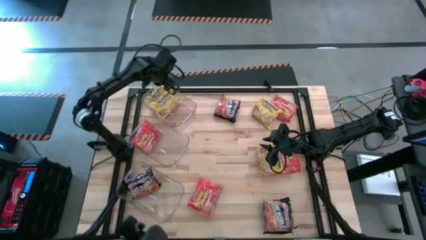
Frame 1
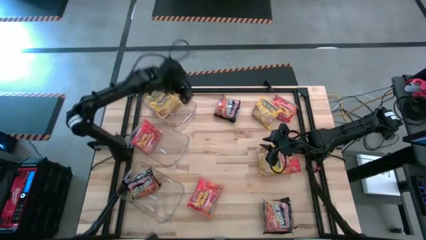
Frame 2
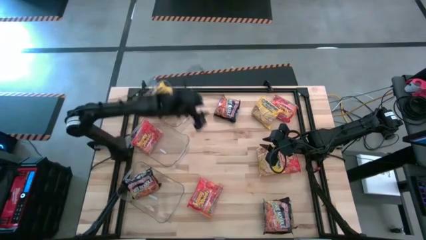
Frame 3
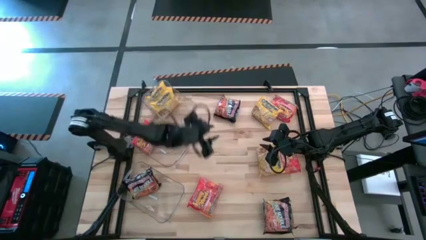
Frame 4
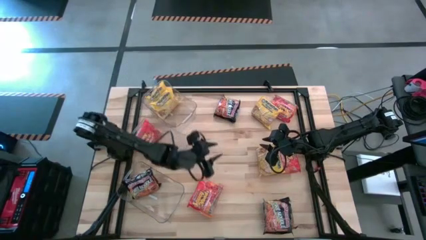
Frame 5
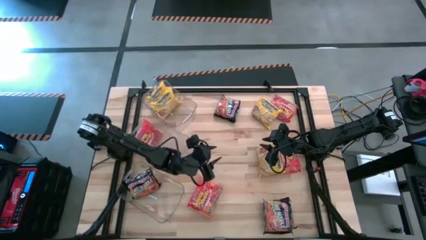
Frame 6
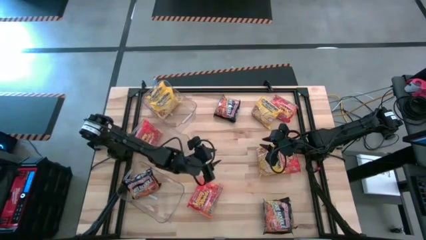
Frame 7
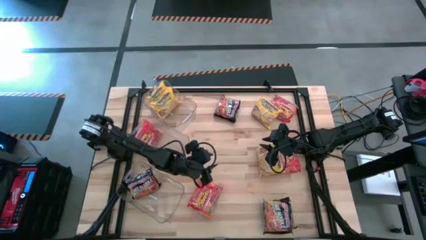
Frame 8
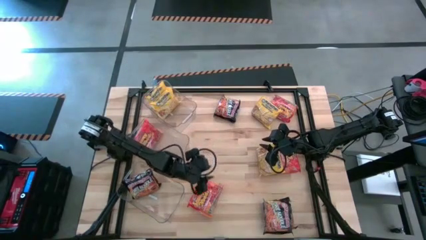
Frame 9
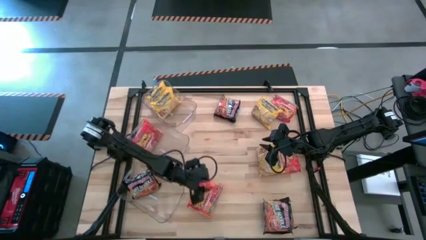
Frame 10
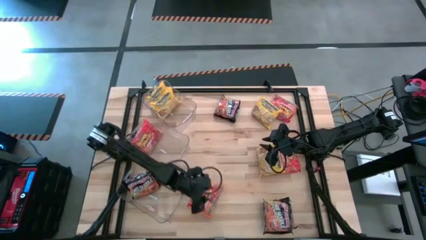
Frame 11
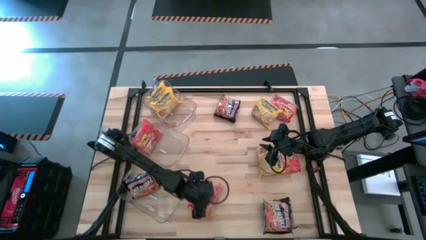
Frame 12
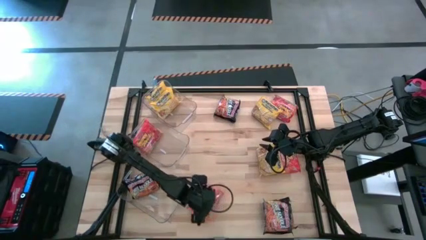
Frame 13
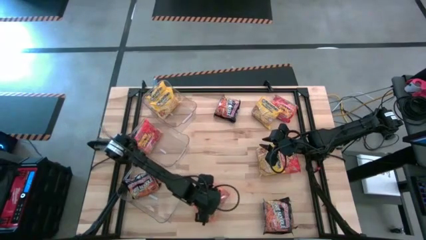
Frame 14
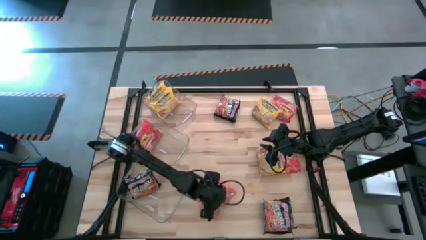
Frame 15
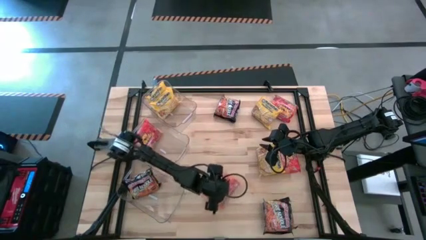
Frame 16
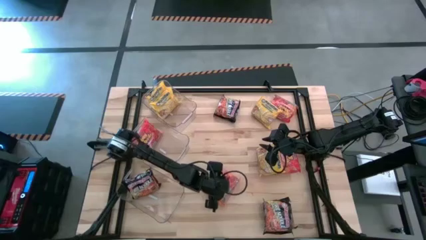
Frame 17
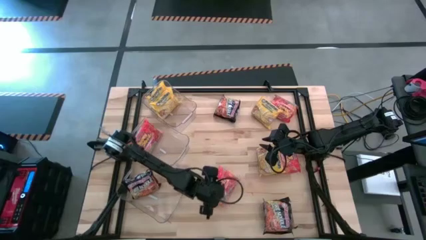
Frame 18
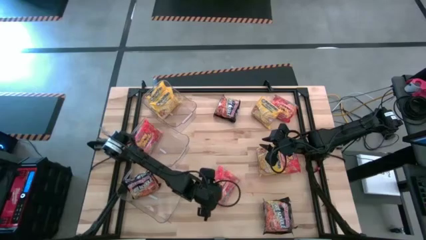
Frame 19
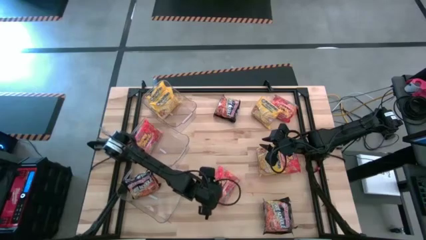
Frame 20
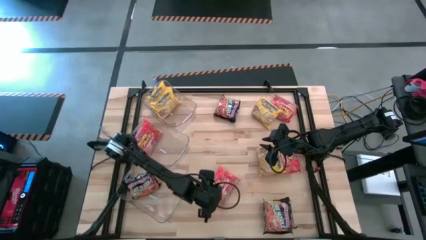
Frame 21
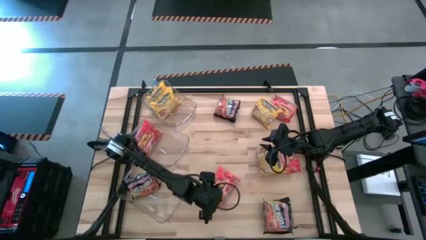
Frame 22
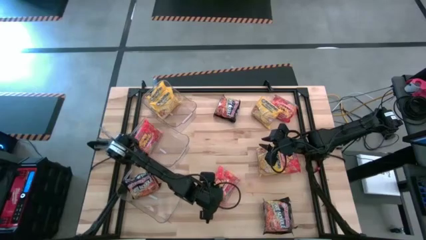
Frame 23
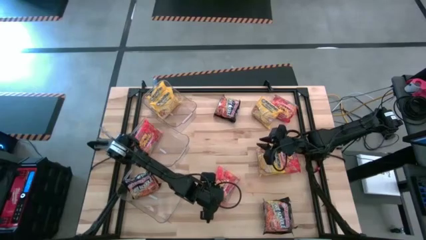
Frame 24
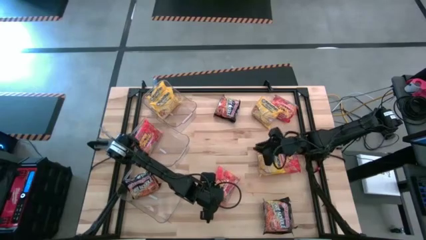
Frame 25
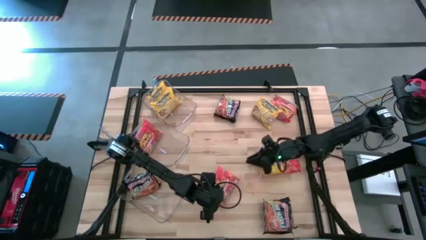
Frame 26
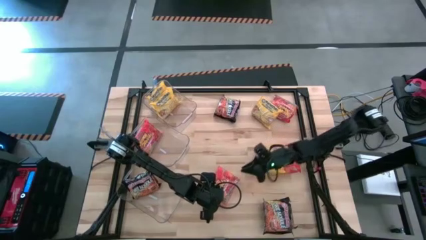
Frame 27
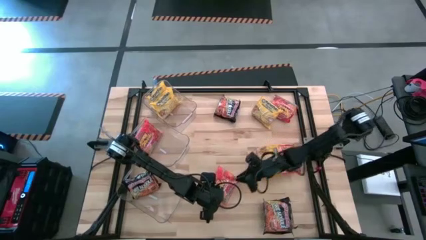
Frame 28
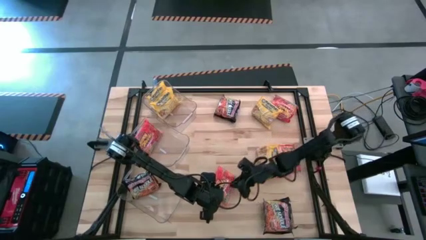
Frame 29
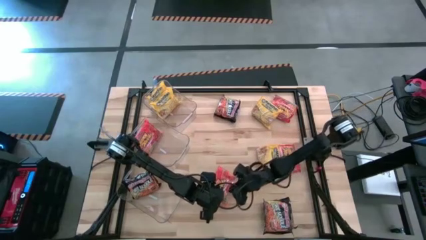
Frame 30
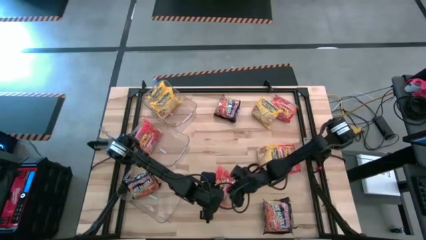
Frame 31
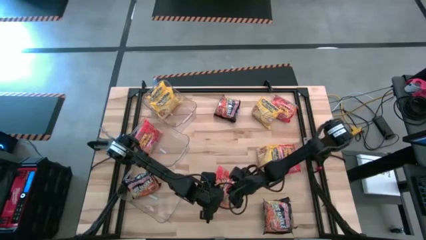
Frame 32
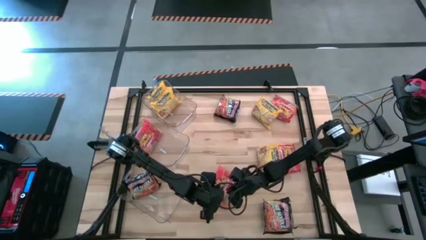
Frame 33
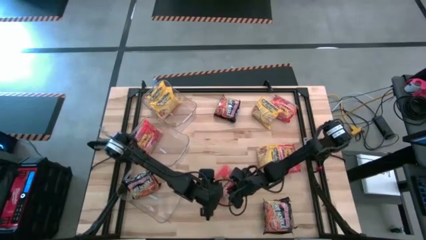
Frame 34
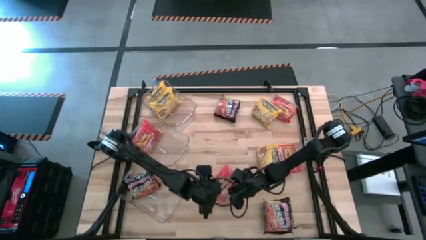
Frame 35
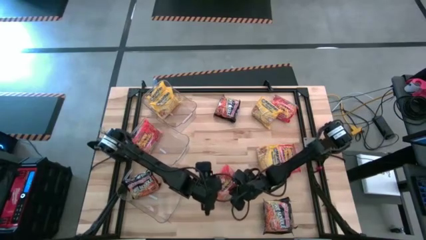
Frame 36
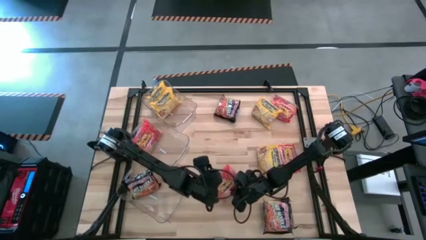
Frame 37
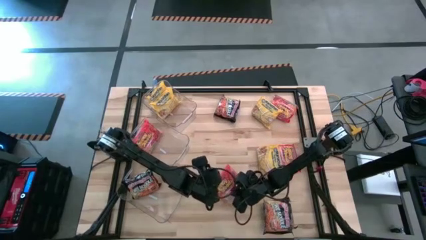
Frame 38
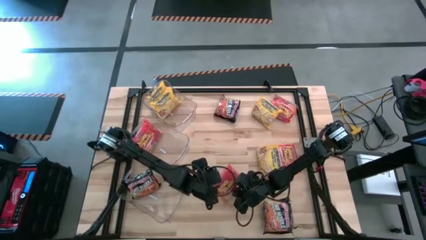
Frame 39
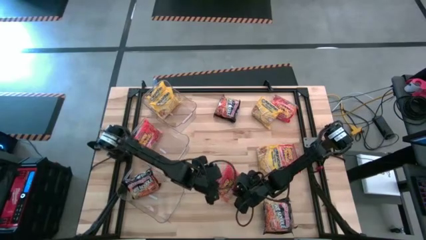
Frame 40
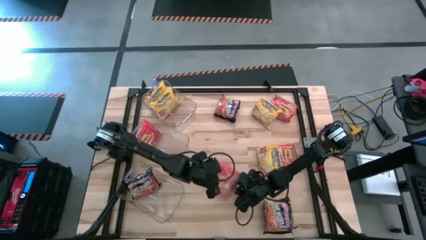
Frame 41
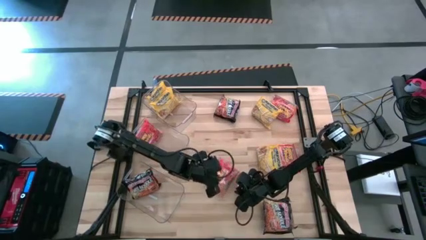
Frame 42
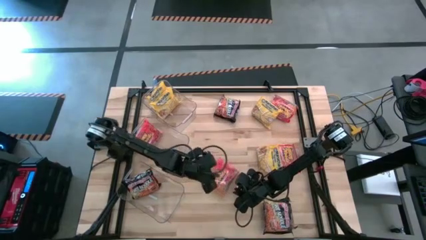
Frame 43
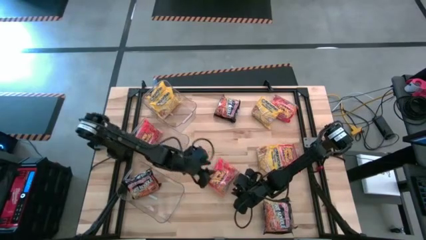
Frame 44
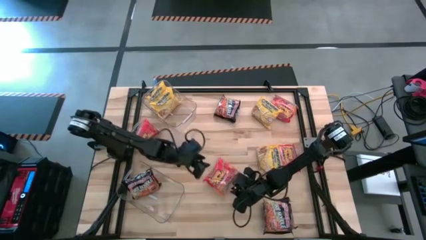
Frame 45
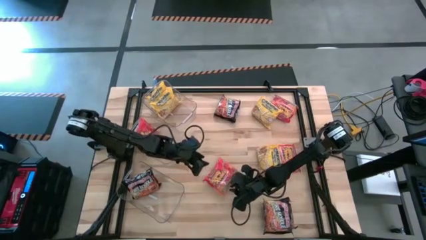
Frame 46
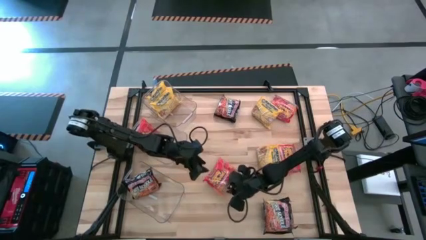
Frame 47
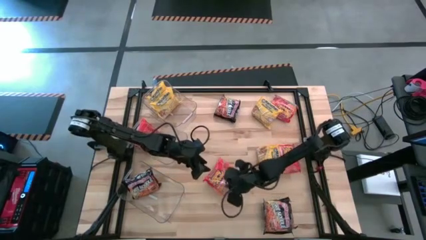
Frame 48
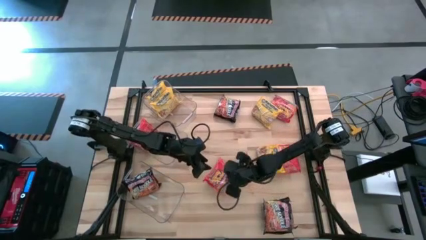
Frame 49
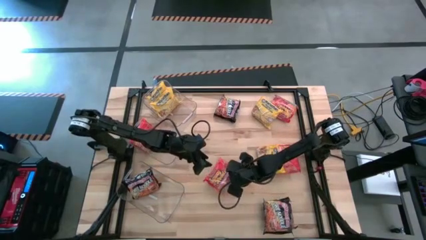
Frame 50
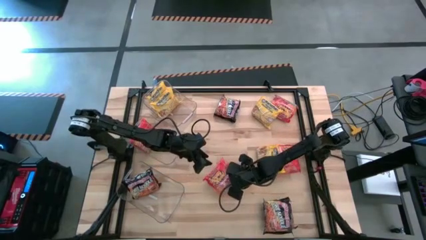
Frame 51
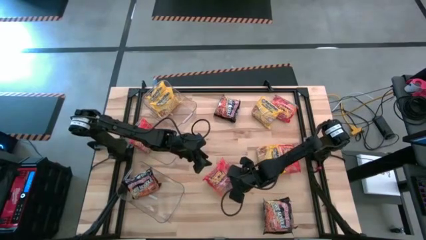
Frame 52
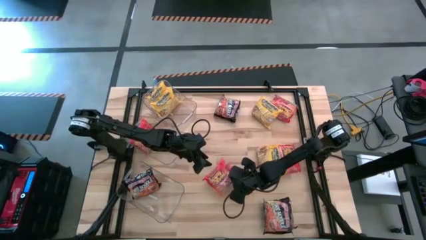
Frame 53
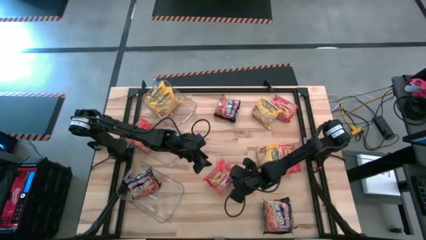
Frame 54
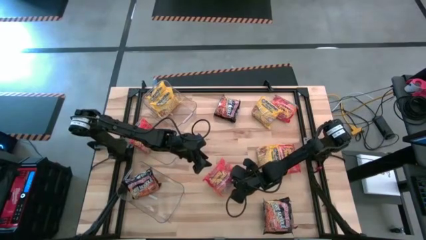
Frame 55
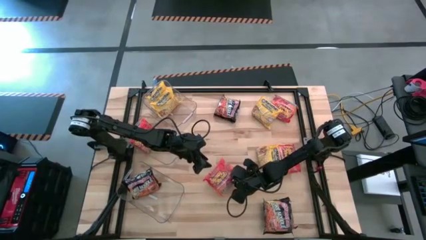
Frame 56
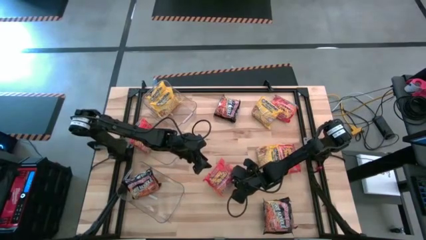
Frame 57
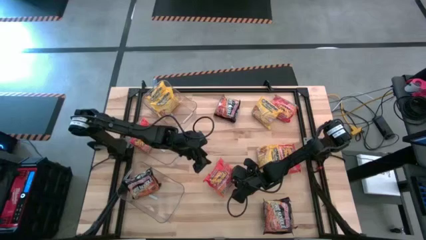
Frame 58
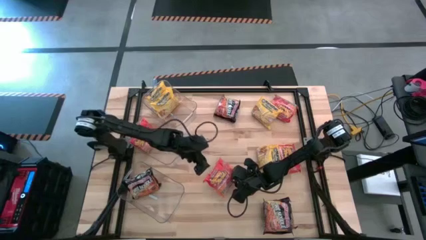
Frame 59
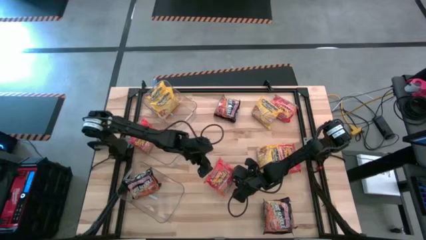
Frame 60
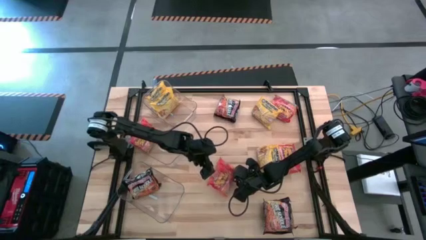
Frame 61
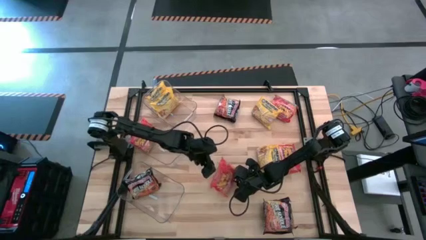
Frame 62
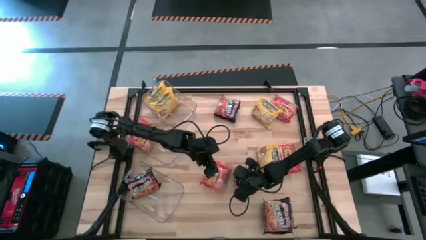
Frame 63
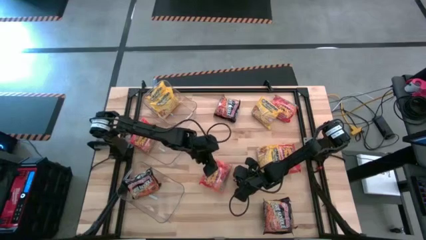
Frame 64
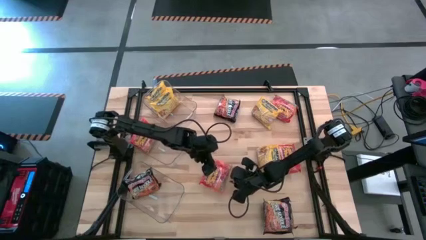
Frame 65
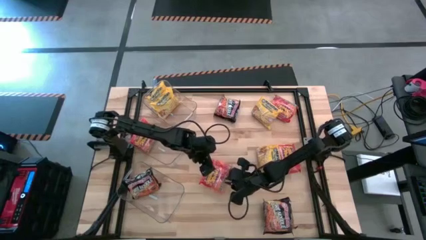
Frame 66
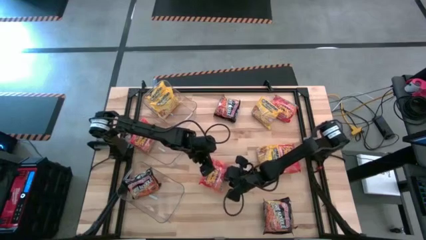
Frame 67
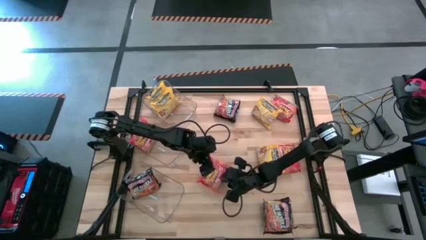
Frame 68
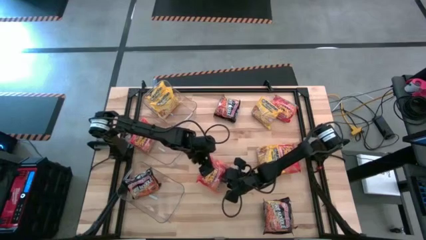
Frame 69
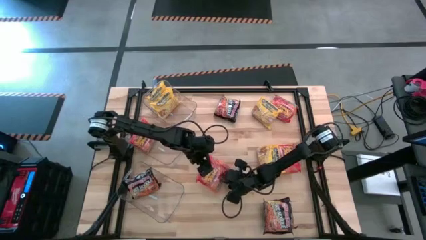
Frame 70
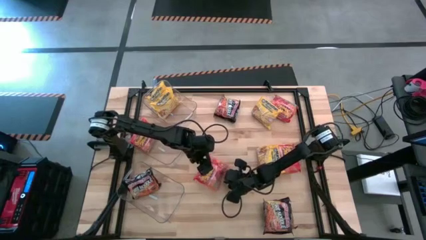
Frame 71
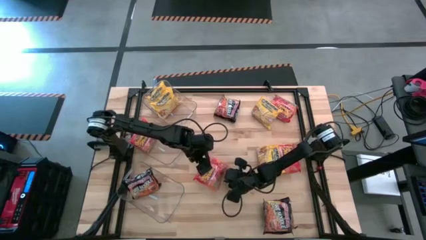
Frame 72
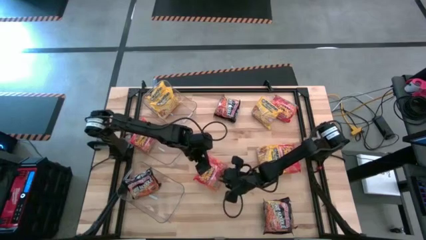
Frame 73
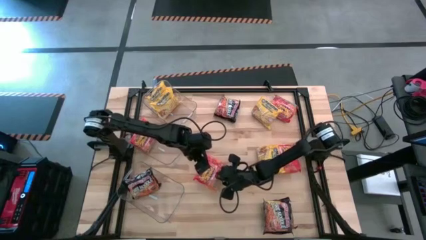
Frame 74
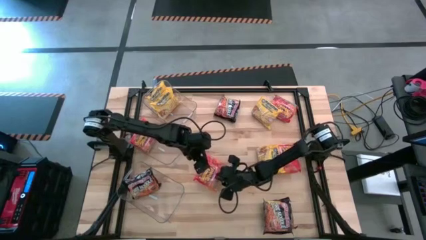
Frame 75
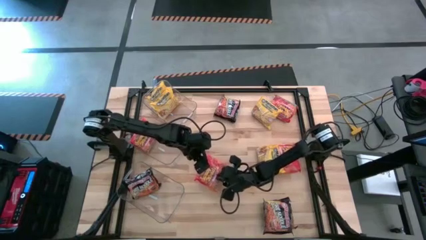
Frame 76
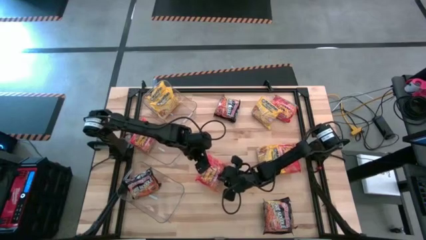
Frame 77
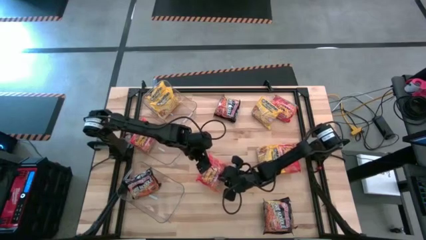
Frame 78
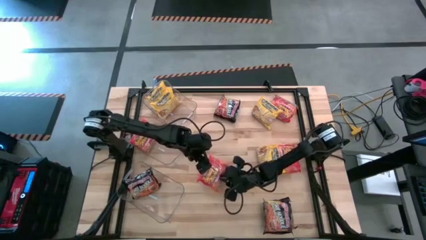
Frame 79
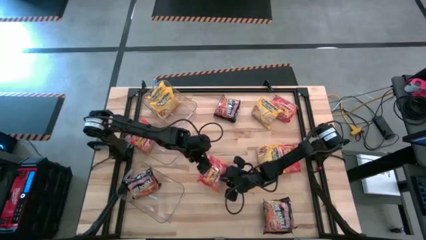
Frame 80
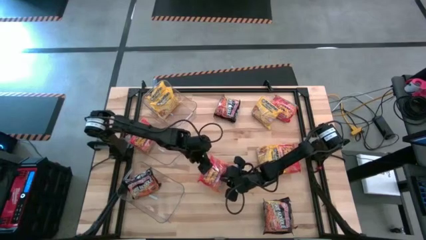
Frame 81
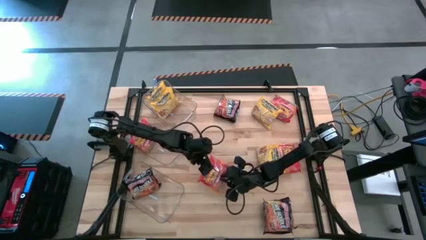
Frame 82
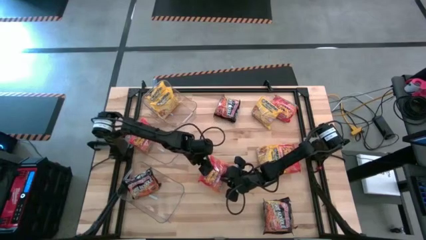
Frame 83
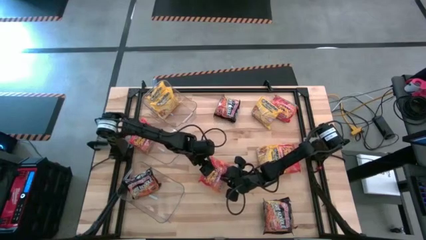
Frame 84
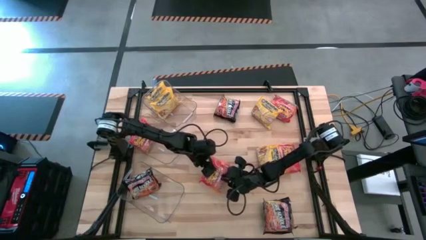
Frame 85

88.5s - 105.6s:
Task: Sort Maruchan noodles
Put the orange noodles pack into the middle transparent bin
